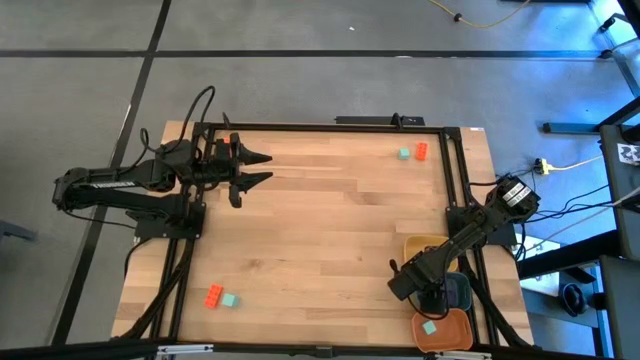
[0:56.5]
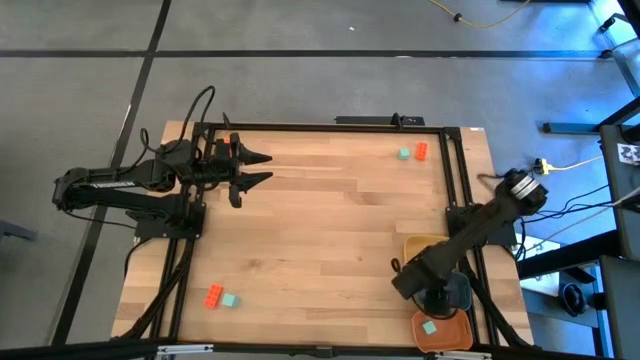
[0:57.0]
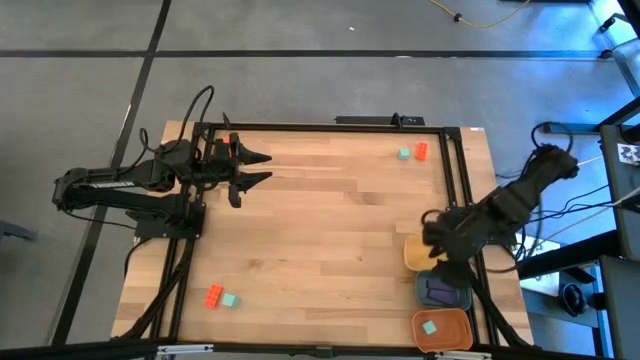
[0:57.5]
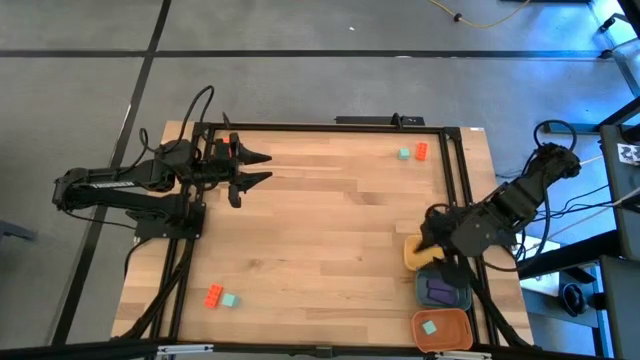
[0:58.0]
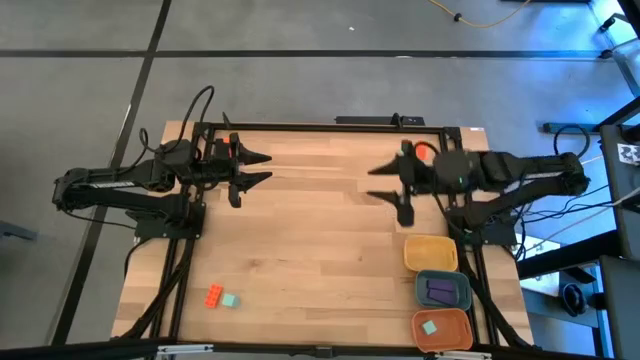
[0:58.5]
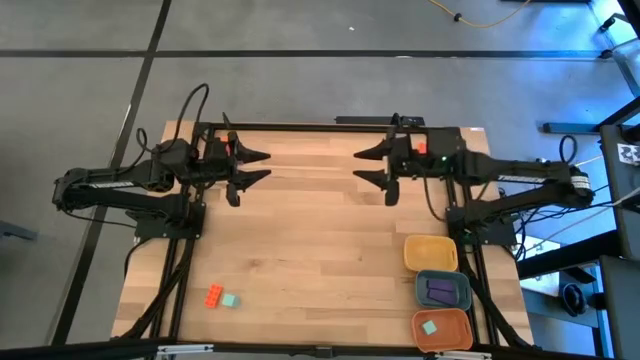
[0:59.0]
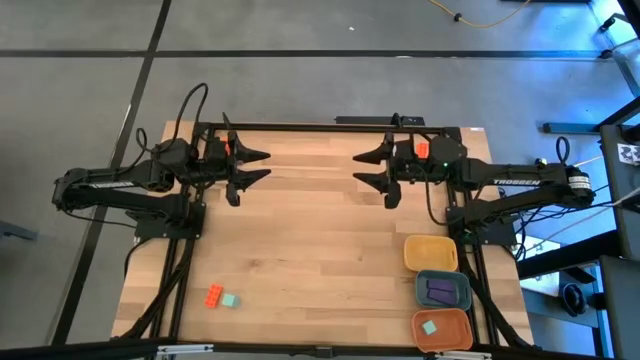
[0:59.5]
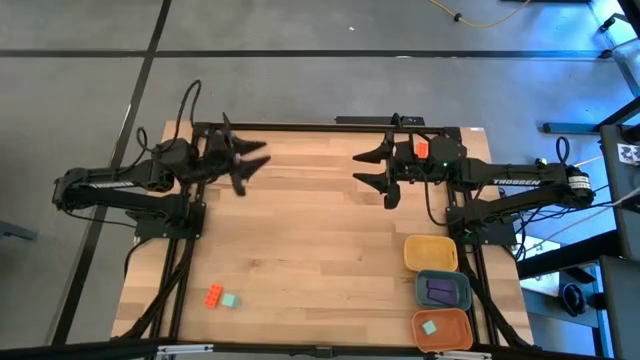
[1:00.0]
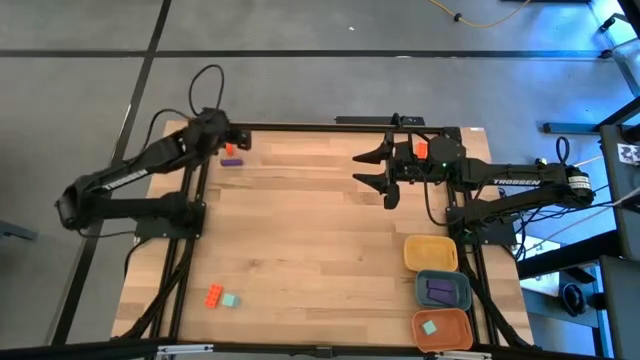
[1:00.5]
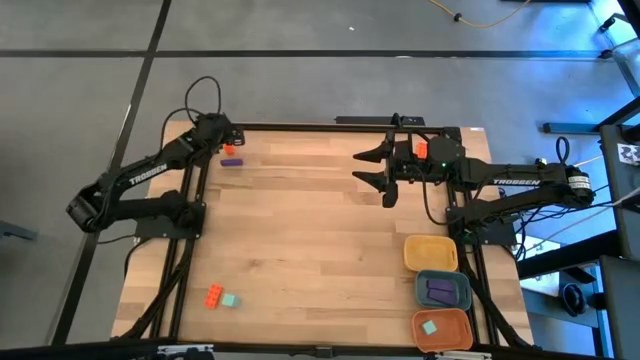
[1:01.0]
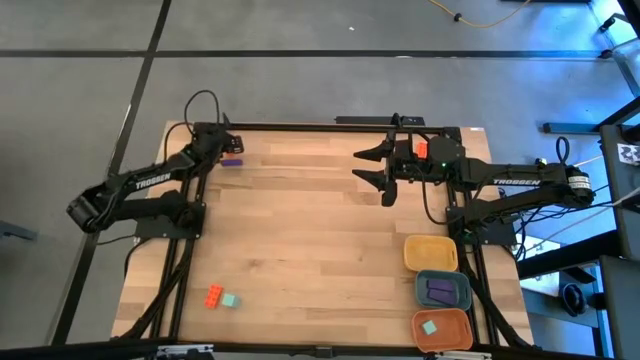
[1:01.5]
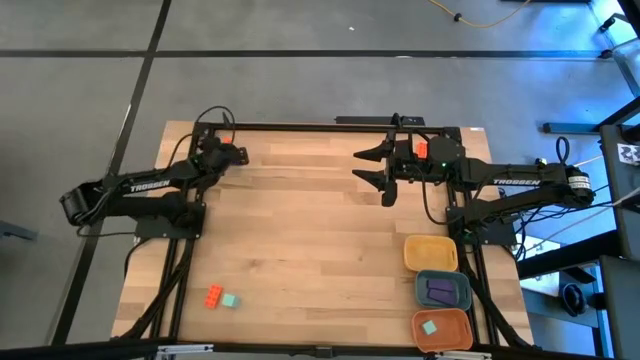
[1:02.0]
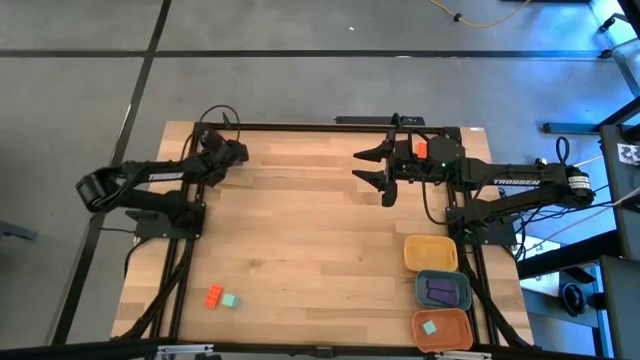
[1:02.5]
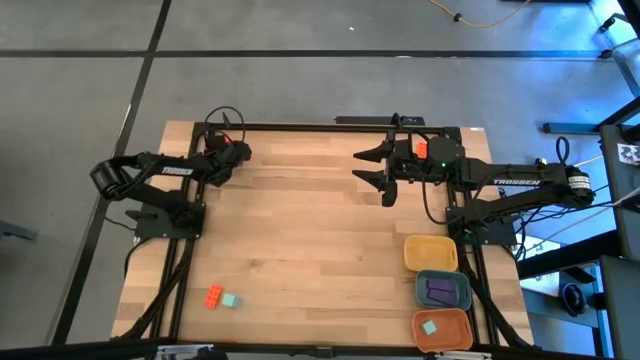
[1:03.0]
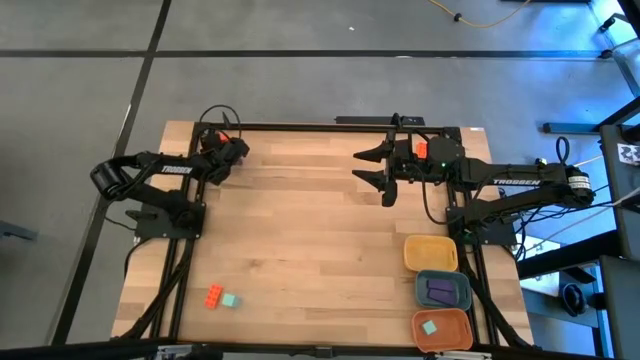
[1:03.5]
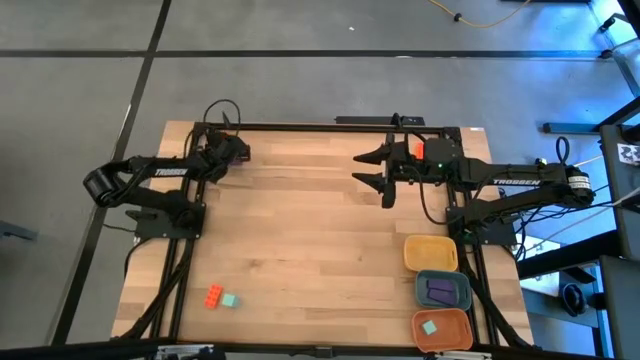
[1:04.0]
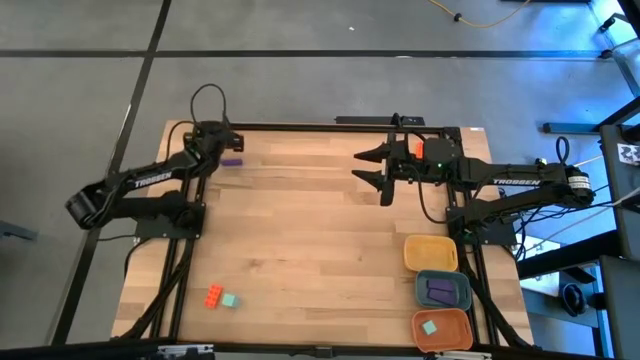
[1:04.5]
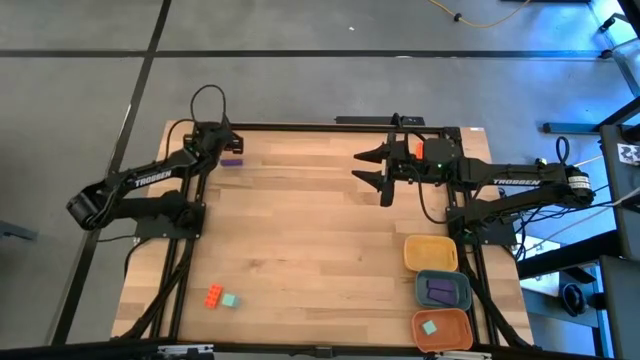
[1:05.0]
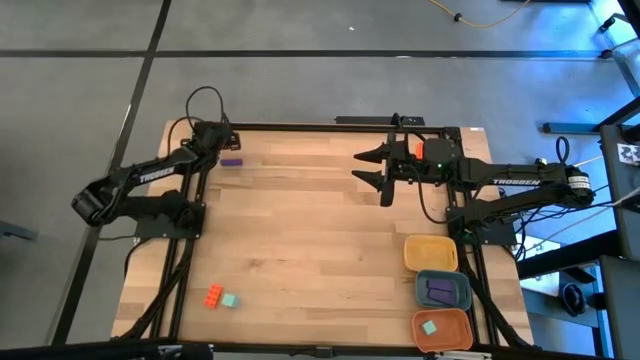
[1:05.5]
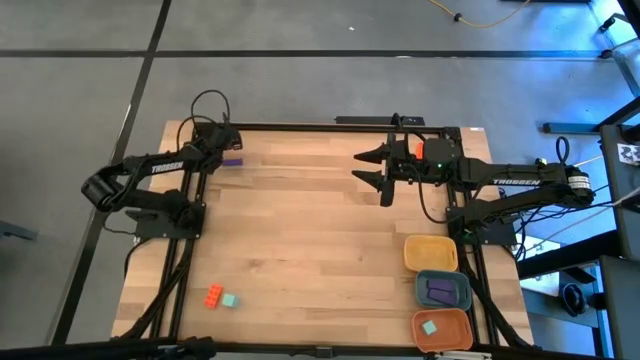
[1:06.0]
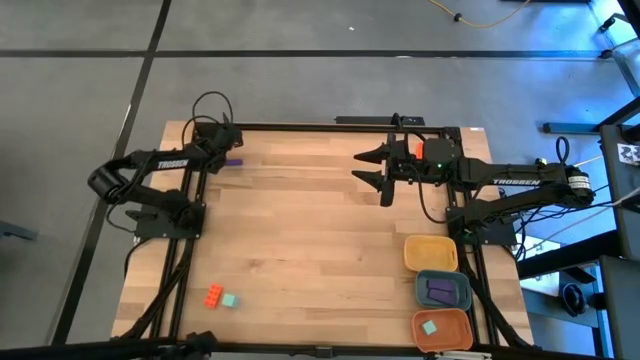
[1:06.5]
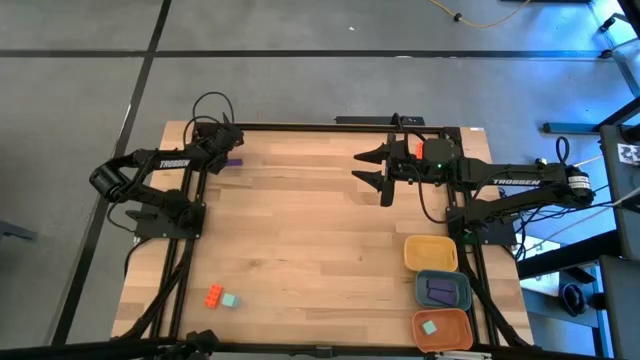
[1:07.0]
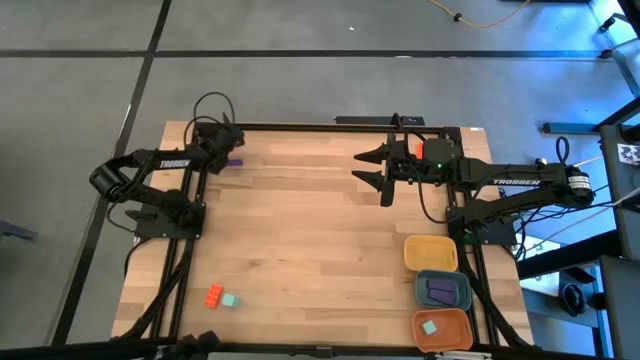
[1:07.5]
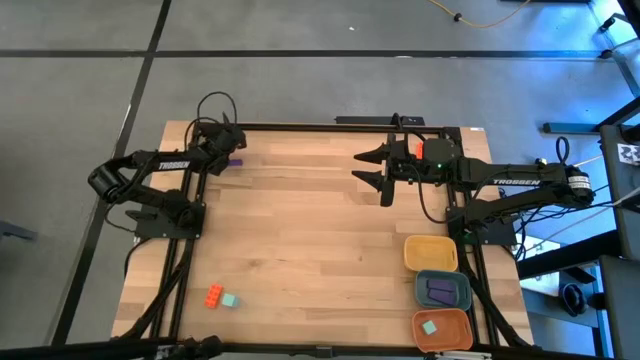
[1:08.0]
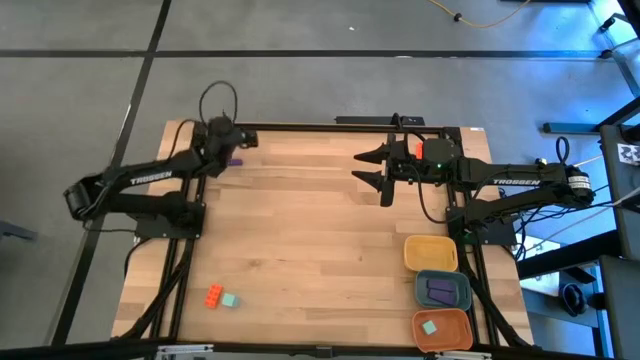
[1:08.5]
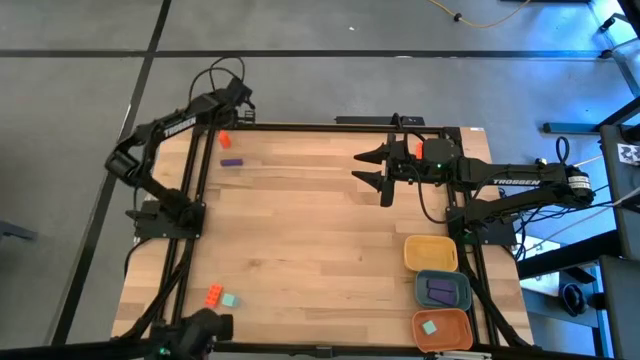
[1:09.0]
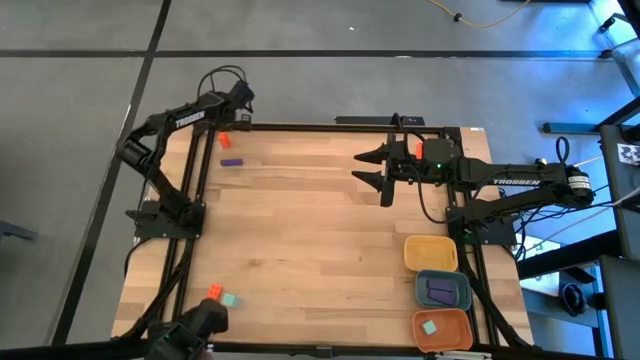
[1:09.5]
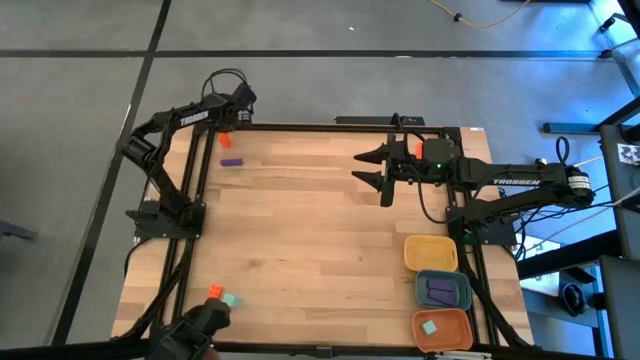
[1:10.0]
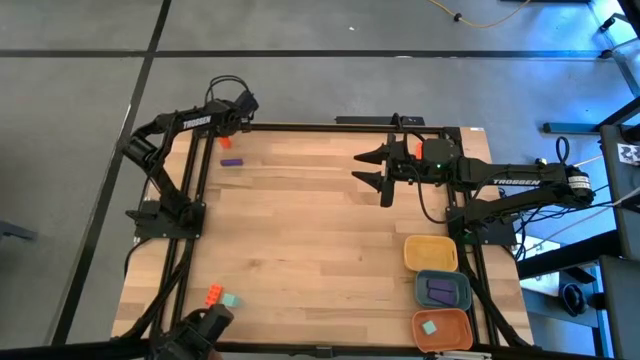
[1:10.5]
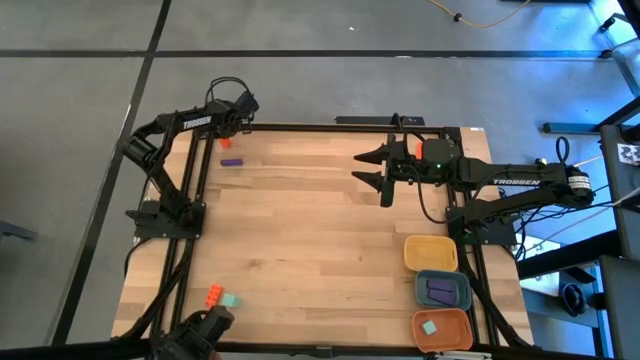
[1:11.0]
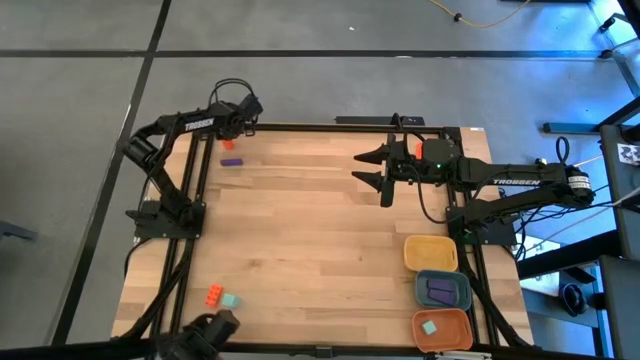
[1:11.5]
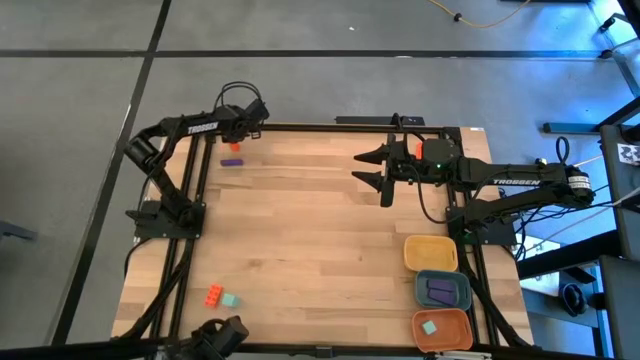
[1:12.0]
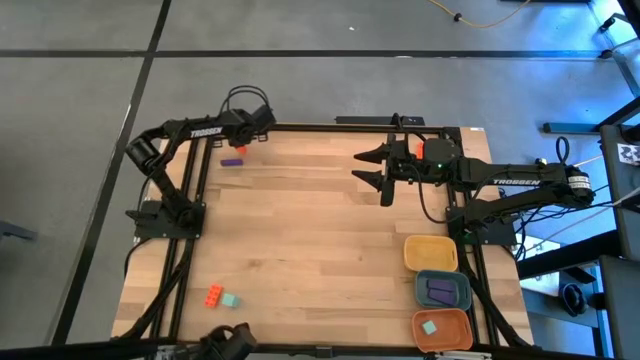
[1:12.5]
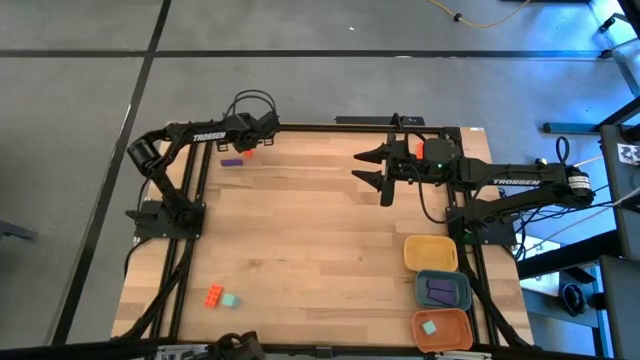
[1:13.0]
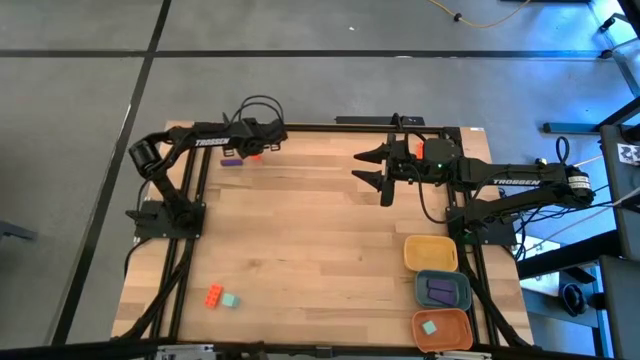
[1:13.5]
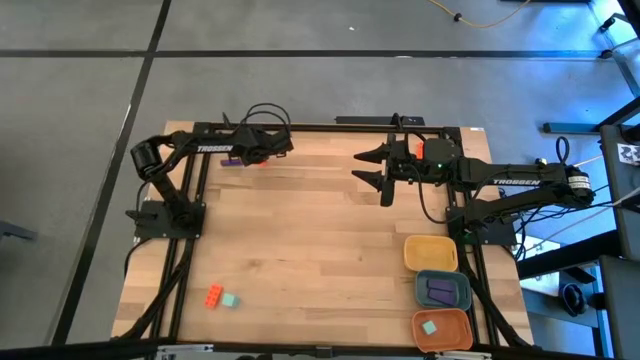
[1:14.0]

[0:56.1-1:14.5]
Task: Sort & place blocks by color
Put the top left orange game piece into the yellow bin

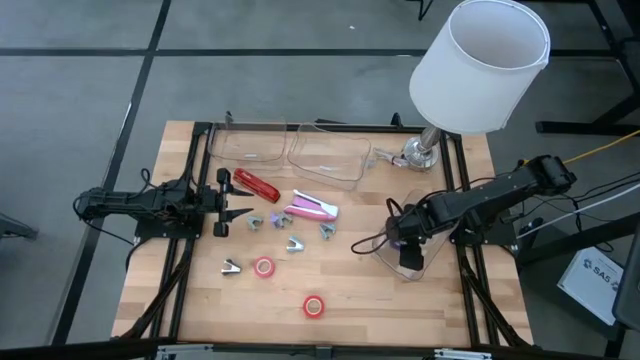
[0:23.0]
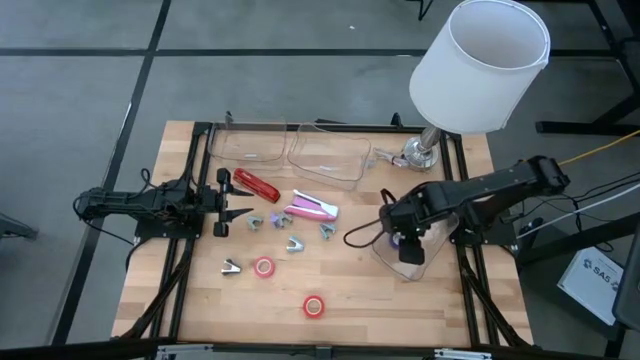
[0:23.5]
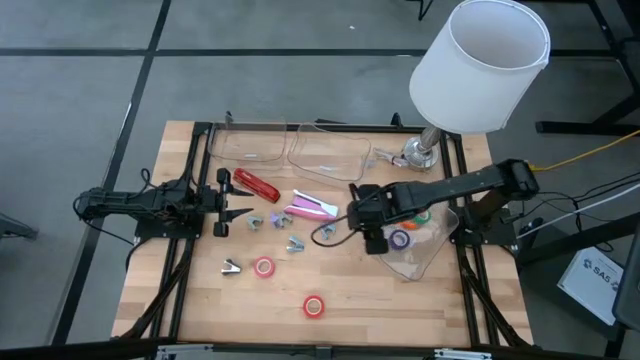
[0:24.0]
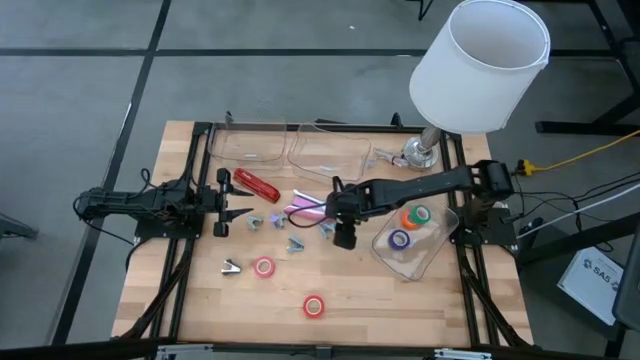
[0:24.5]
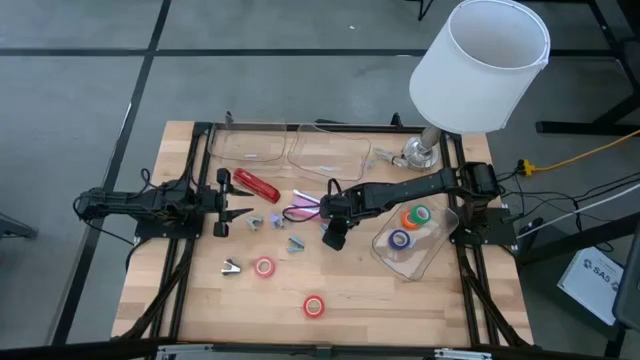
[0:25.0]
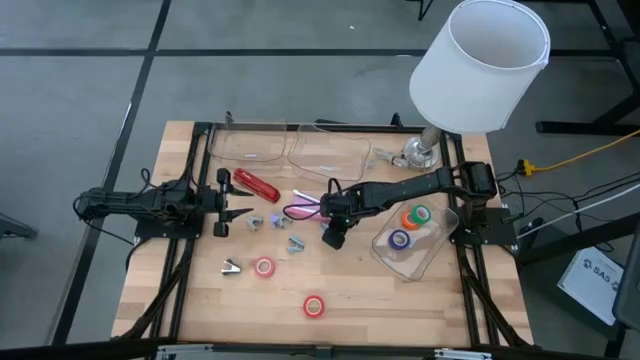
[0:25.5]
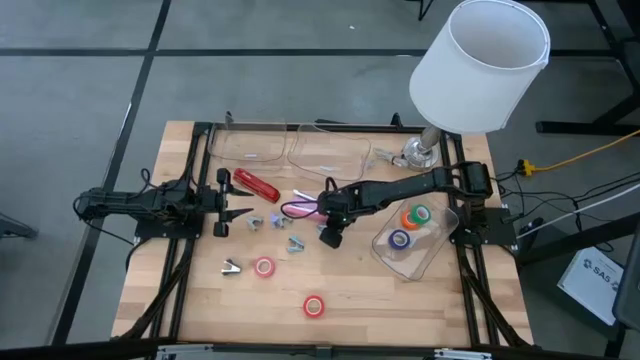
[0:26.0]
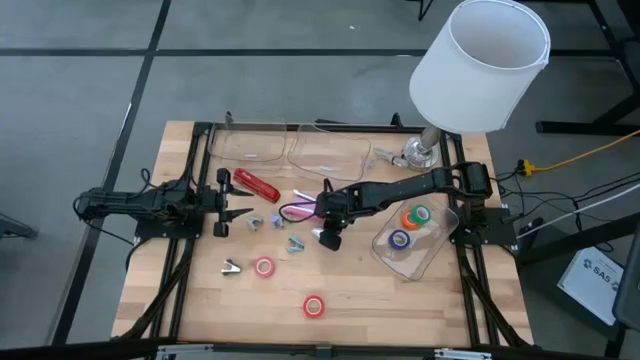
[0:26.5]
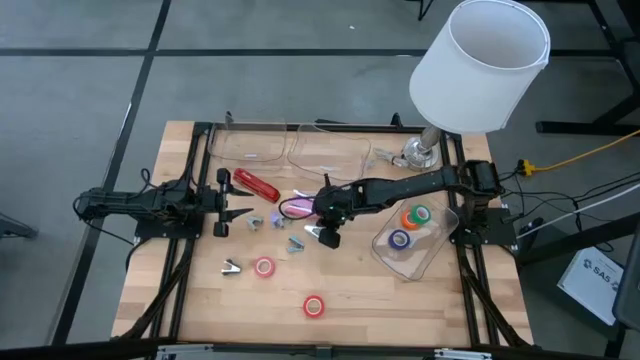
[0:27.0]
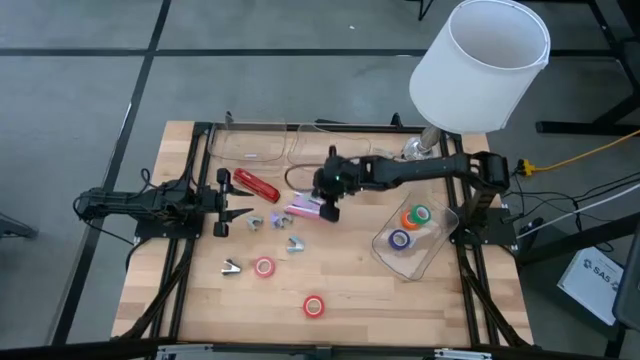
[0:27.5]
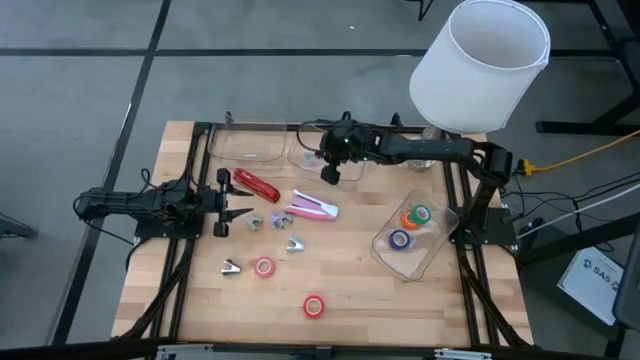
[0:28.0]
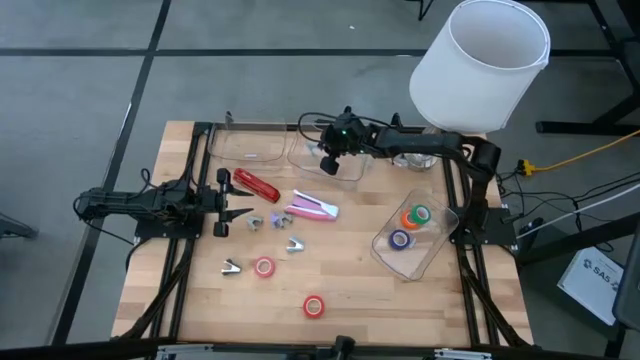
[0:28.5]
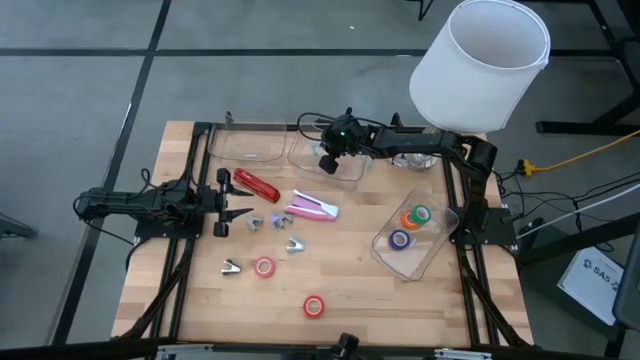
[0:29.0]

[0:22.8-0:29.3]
Task: Pick and place Stapler, Stapler remover, tape
Put the right blue staple remover into the top right transparent bin
